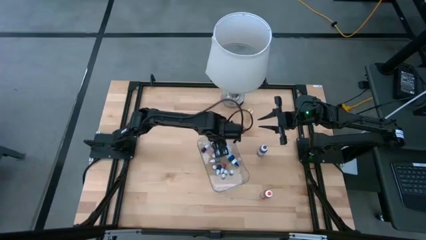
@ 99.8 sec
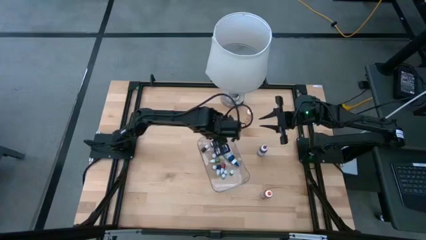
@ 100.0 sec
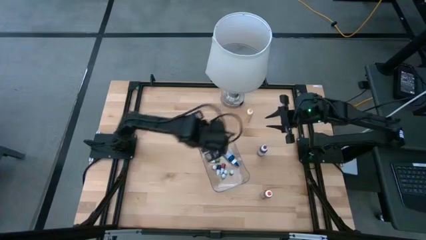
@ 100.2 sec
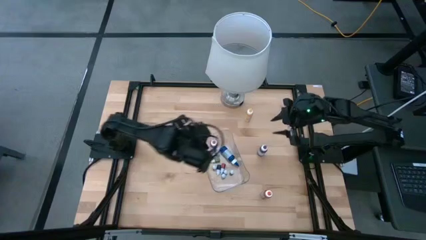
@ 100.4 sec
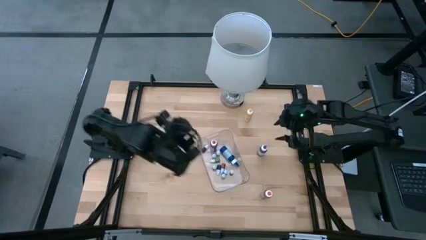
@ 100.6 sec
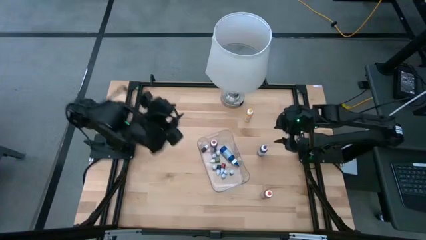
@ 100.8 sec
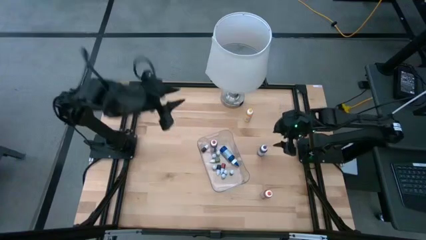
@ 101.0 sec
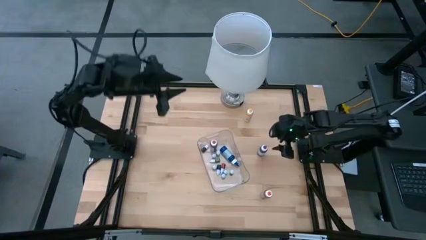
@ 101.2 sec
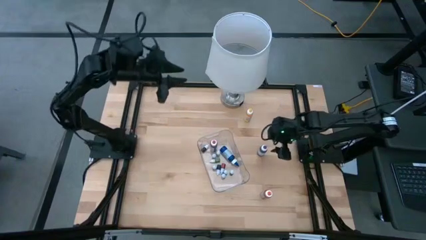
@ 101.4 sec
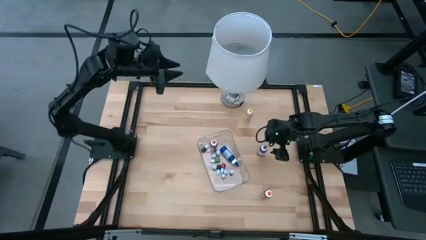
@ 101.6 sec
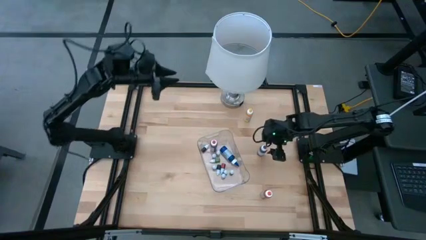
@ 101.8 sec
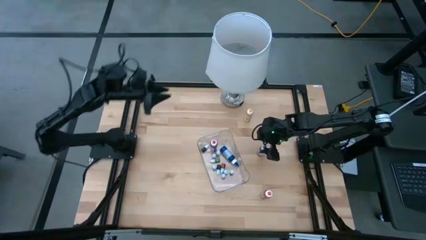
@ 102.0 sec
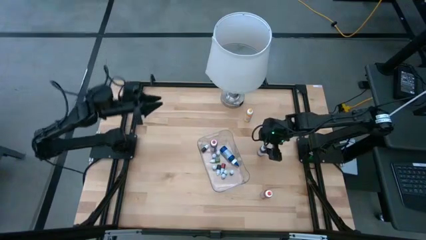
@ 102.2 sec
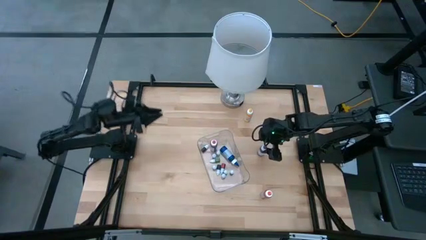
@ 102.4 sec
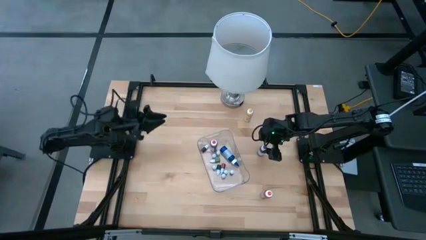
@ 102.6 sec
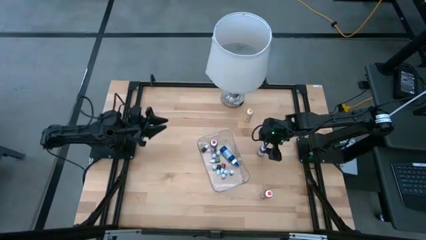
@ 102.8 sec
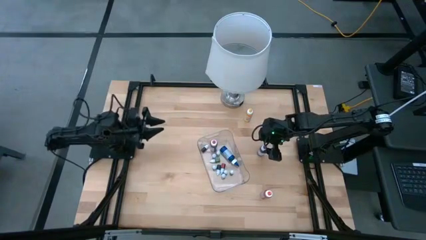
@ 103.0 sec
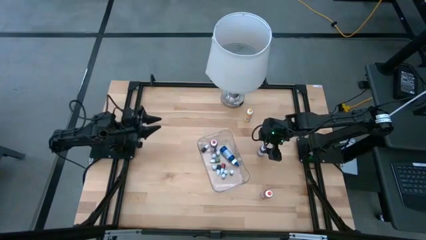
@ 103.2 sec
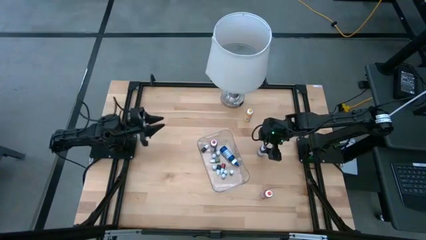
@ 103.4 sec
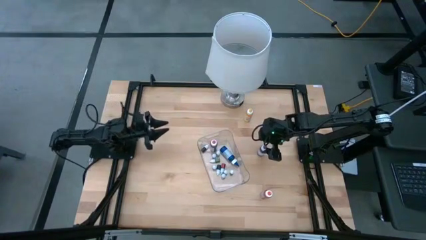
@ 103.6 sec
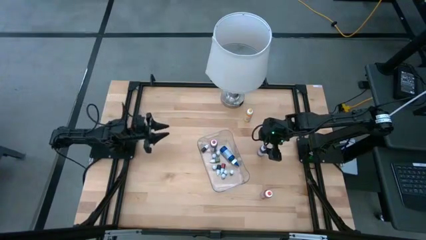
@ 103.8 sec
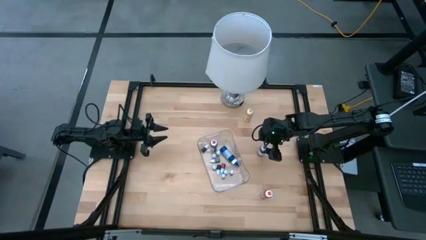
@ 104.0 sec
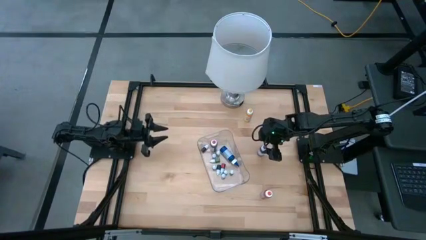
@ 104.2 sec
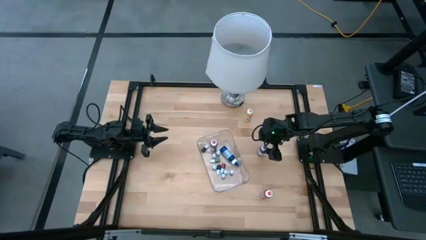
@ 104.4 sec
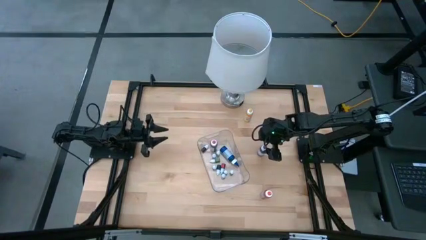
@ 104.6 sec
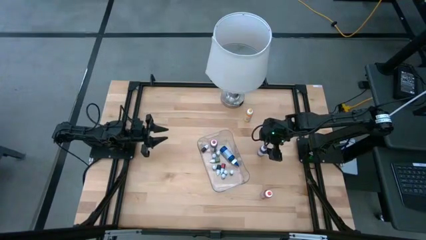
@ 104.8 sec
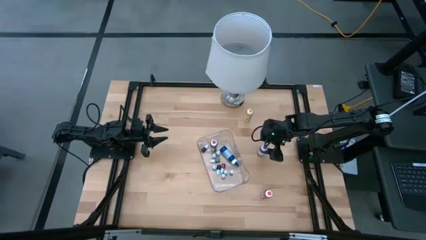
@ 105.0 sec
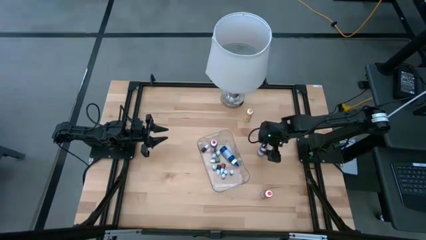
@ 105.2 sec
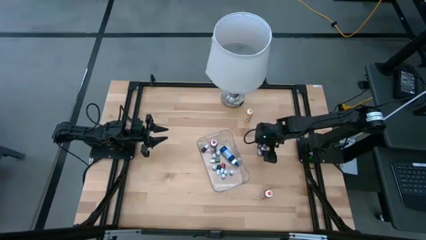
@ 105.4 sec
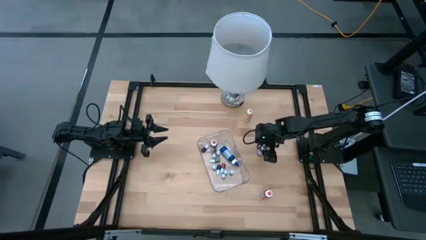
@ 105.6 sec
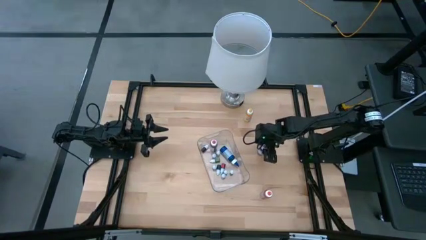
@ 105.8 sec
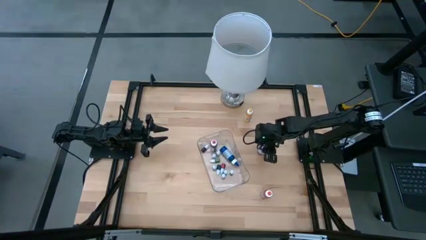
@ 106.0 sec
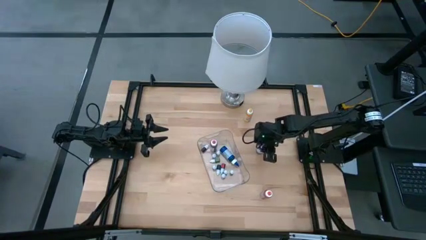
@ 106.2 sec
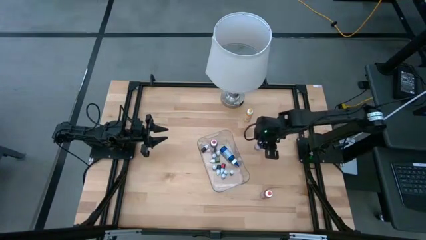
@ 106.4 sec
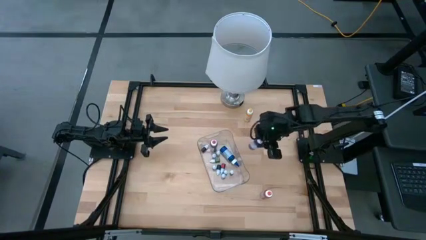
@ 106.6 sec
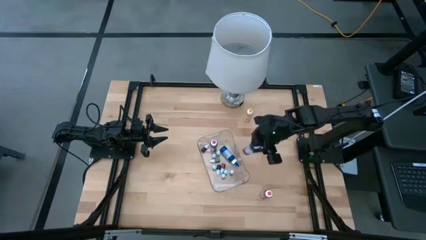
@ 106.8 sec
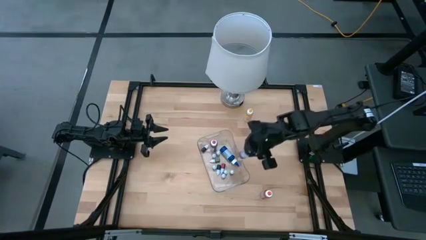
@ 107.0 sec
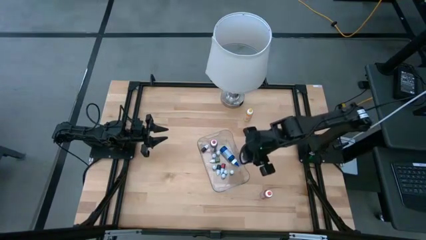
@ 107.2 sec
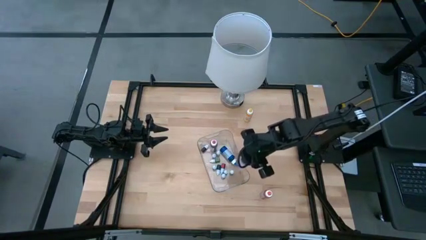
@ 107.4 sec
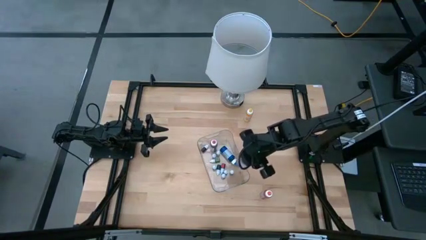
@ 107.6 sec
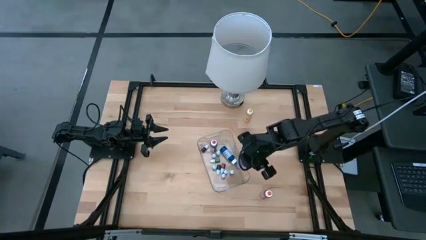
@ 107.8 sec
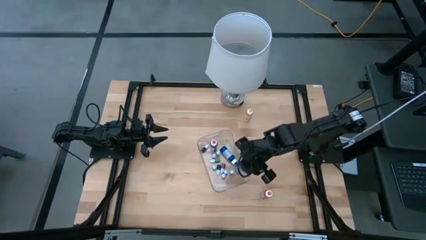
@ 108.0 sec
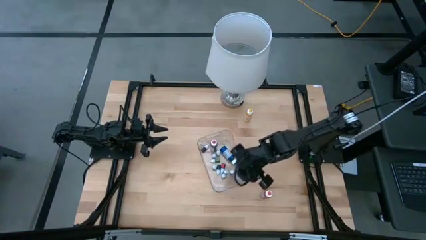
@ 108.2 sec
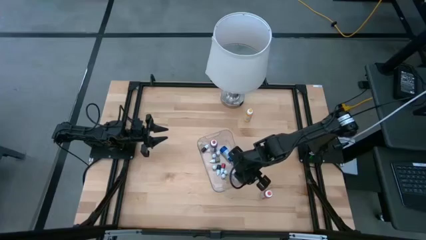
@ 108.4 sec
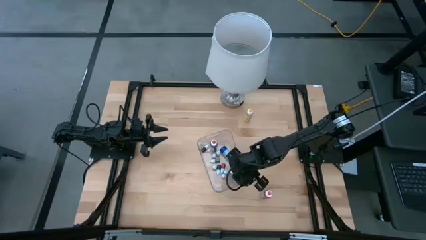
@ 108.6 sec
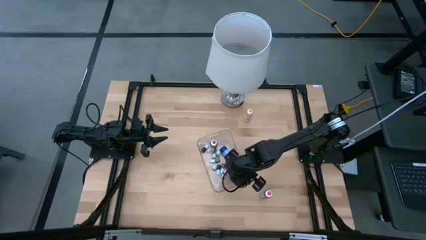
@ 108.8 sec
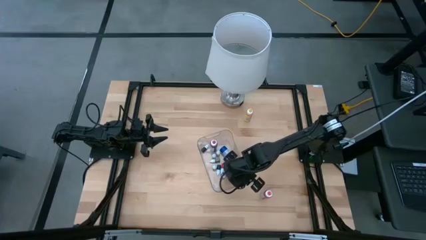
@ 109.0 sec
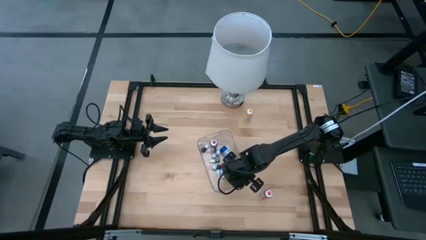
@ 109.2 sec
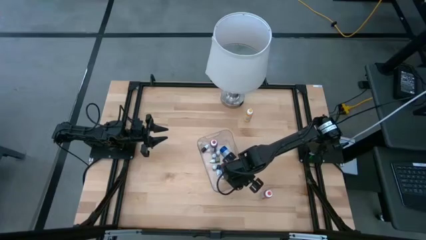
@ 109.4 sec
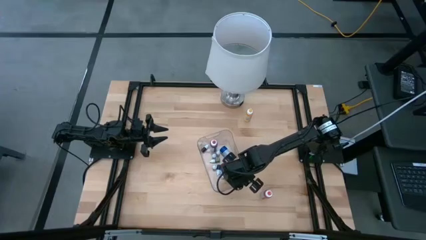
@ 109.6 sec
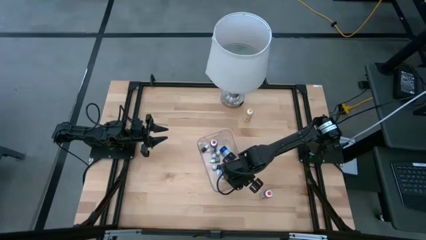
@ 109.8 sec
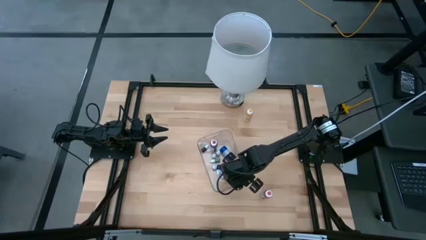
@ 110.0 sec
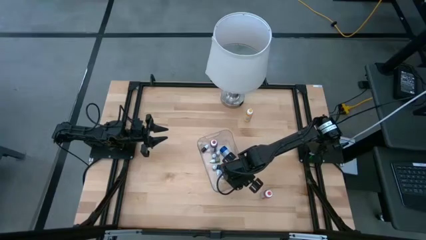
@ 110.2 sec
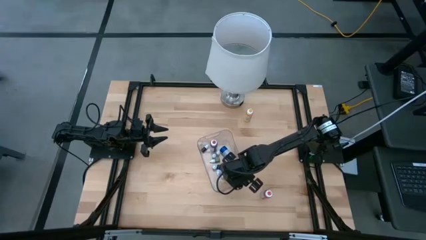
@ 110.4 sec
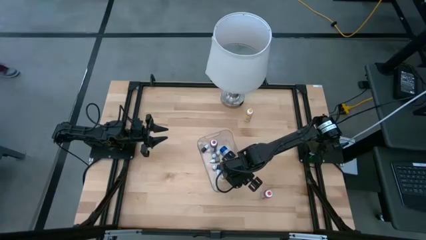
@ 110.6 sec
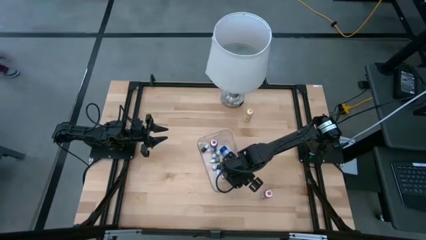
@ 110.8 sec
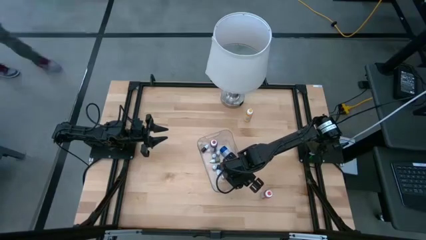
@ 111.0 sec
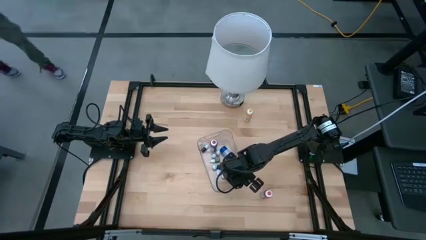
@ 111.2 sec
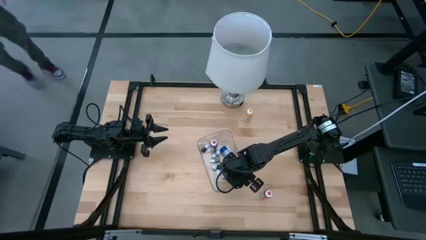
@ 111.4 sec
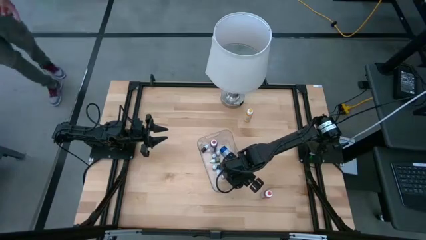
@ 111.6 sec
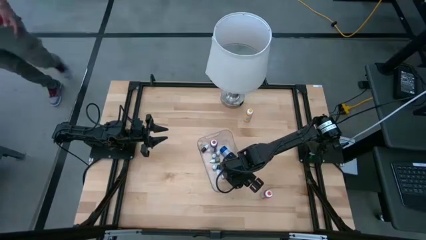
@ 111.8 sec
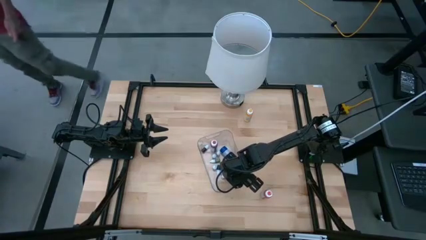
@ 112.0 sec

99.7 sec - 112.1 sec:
Task: Pick & Place food coloring
Put the big purple food coloring bottle into the transparent bin

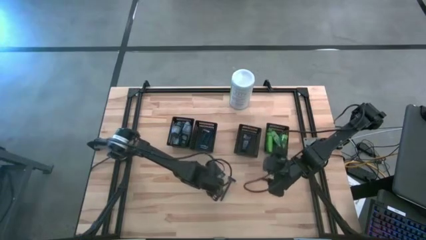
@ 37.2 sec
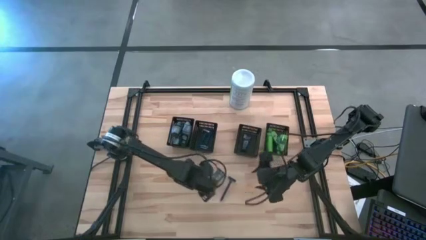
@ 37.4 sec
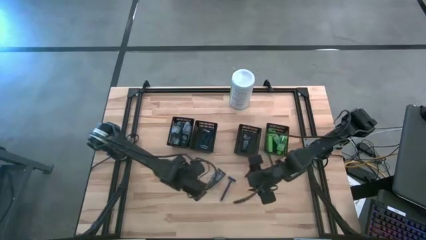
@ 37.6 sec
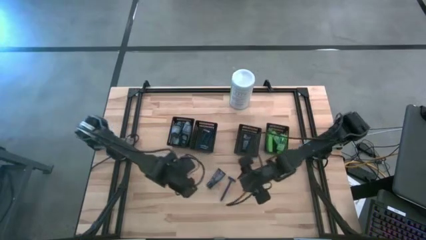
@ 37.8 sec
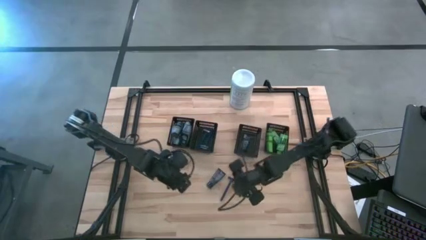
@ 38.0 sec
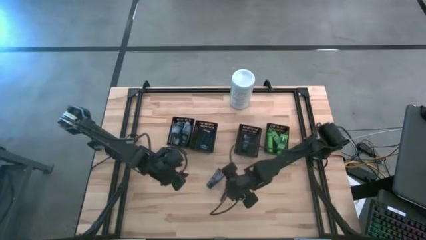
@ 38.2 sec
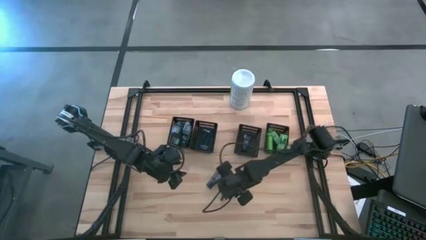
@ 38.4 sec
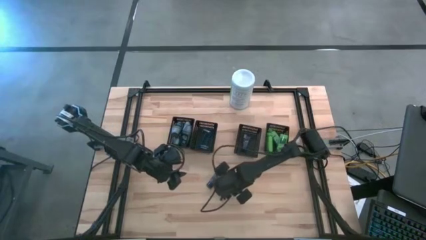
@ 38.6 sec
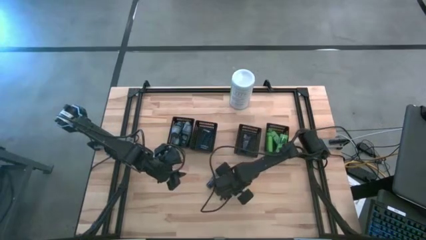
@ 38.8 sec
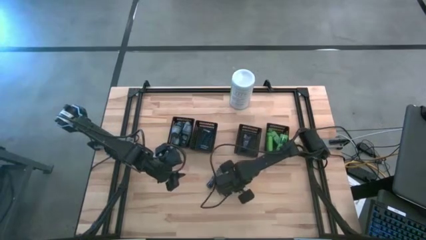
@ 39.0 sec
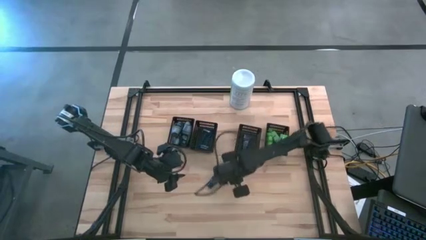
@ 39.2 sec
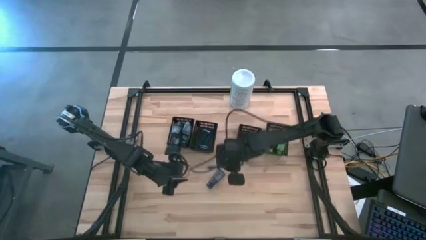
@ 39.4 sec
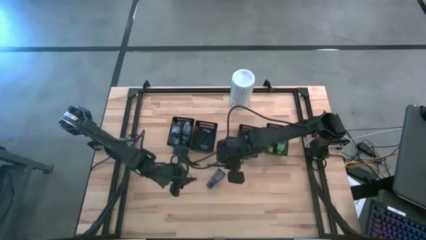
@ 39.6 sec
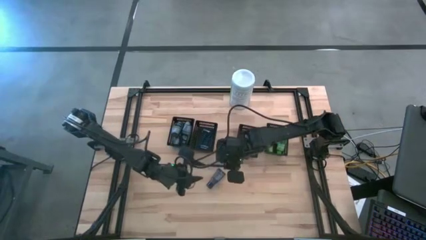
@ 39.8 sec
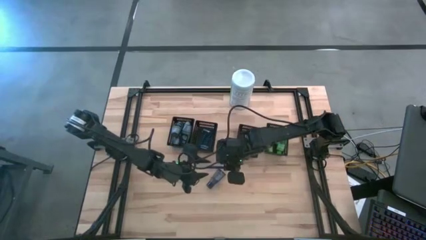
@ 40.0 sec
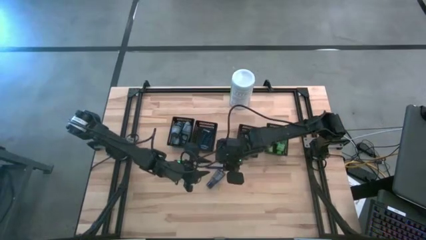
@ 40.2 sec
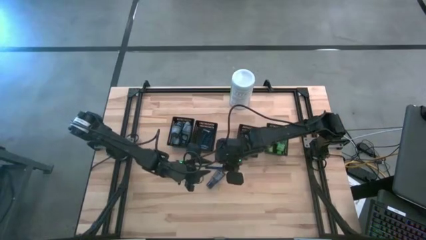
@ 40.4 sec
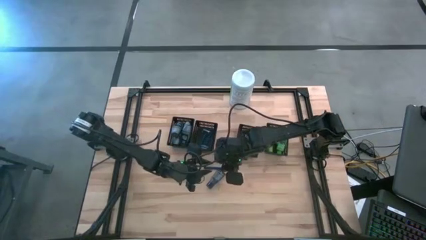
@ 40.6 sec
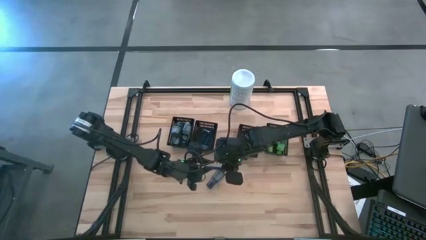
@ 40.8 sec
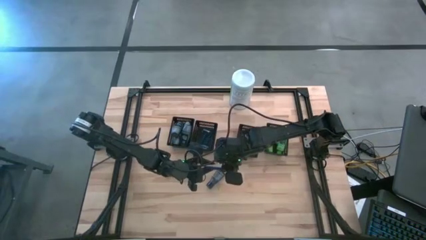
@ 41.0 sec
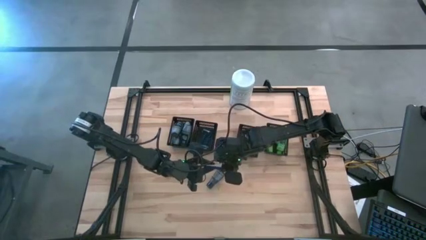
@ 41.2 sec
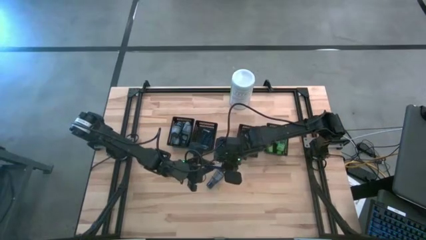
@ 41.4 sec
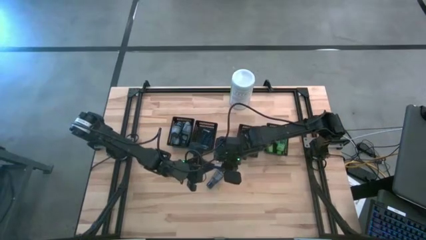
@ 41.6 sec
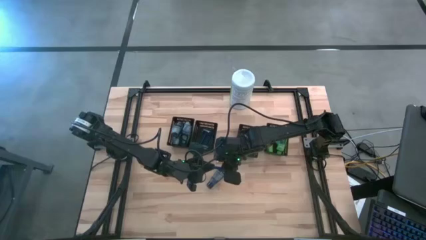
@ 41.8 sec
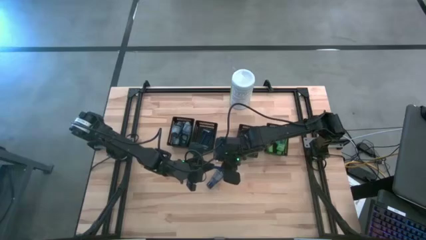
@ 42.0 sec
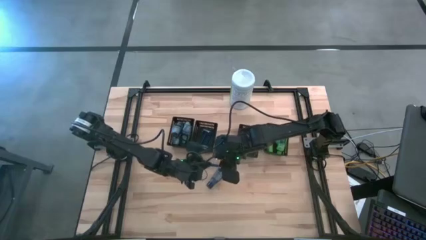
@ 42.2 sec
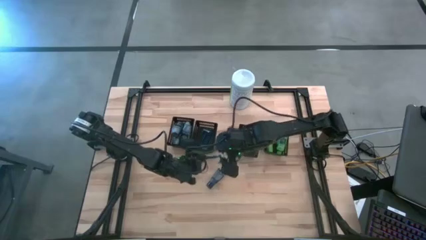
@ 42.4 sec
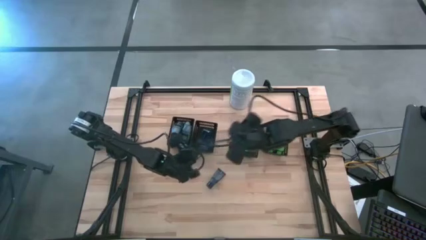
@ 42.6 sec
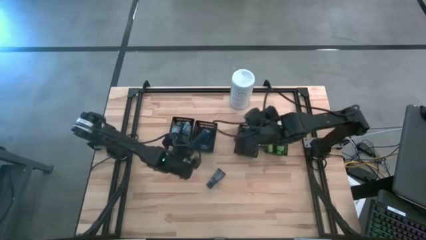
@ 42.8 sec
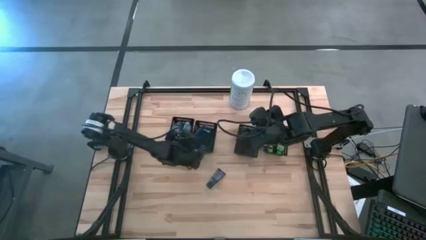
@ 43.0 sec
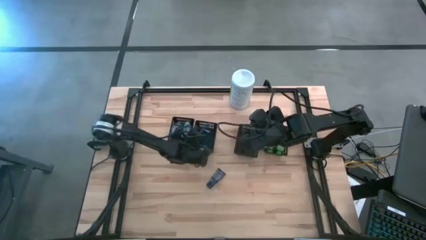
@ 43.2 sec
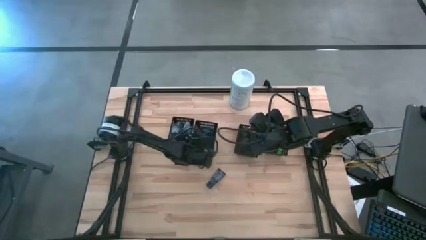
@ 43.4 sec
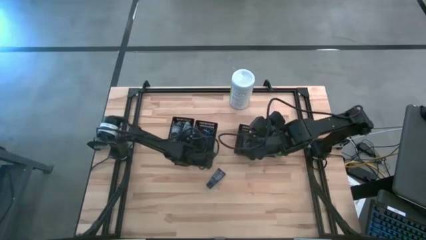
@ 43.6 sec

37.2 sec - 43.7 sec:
Task: Pick & Place Travel size toiletries
Put the blue razor into the middle left black bin
